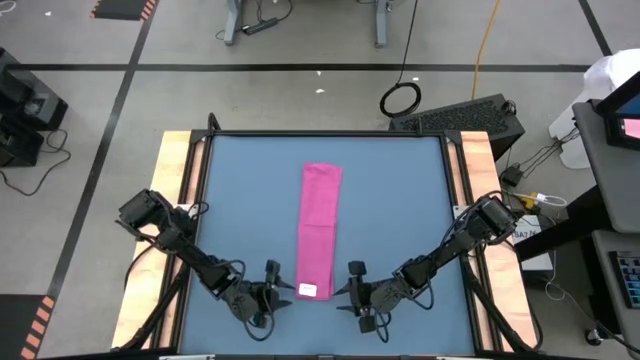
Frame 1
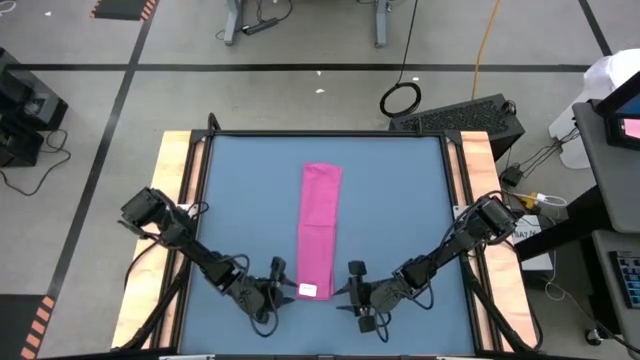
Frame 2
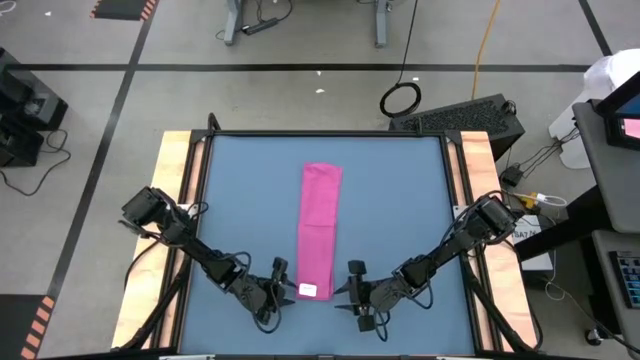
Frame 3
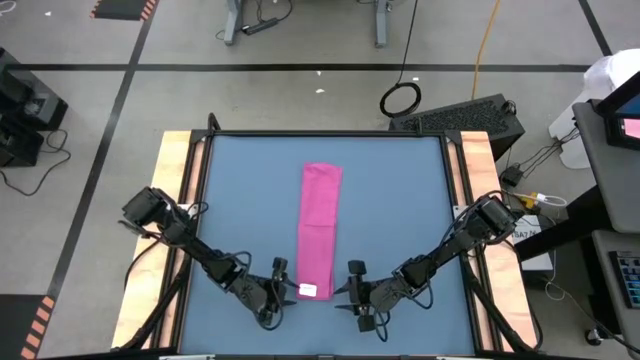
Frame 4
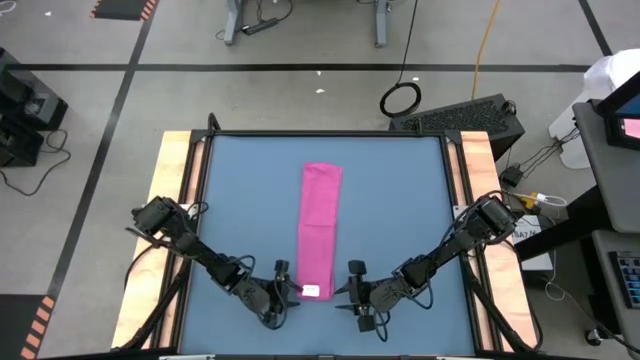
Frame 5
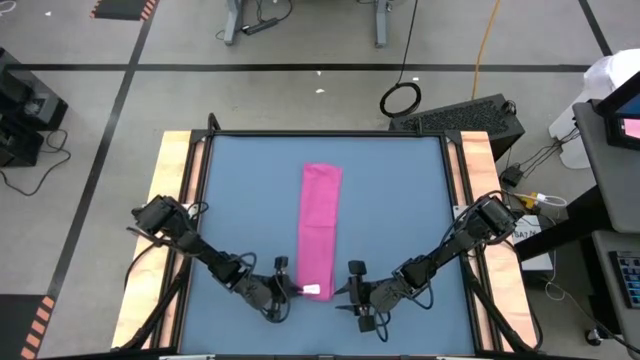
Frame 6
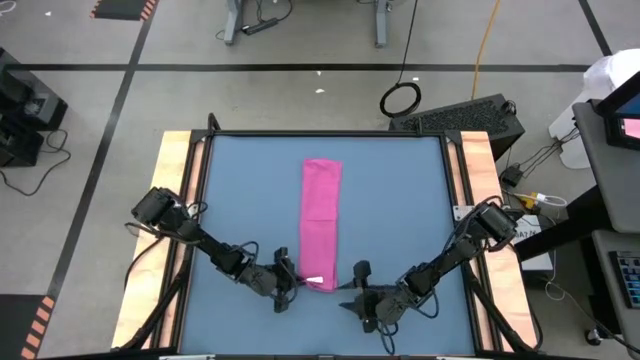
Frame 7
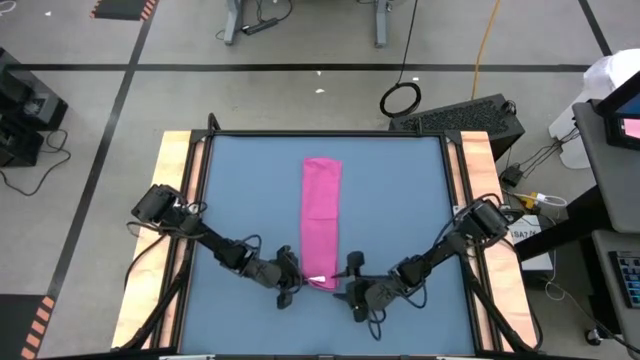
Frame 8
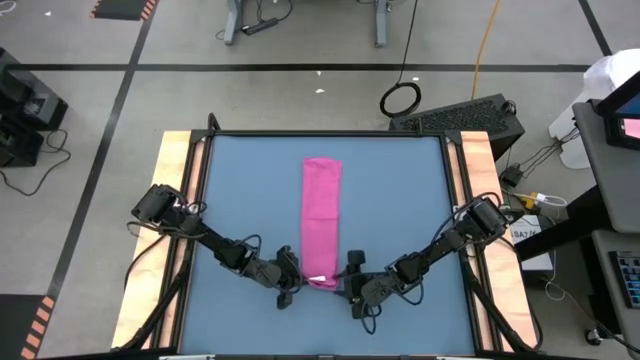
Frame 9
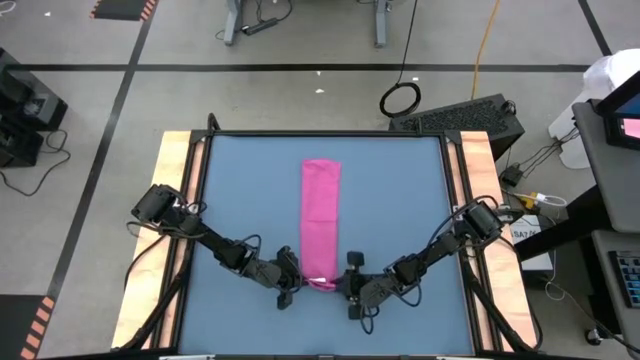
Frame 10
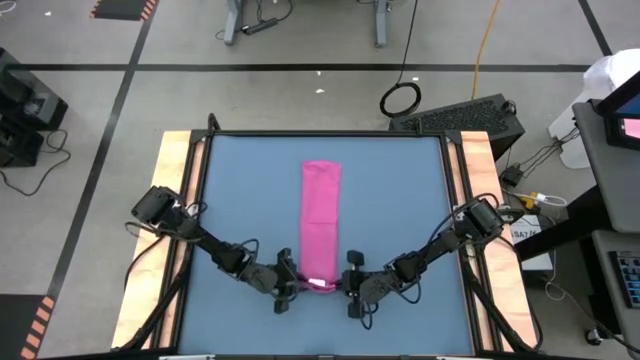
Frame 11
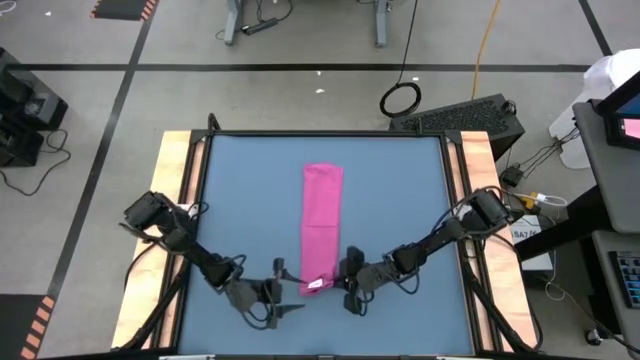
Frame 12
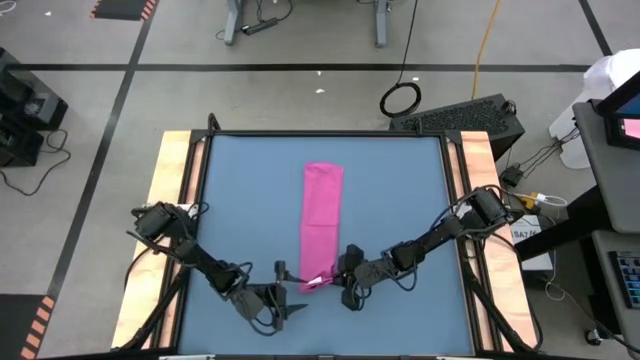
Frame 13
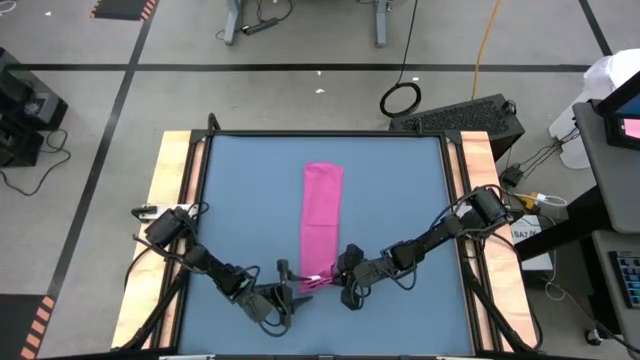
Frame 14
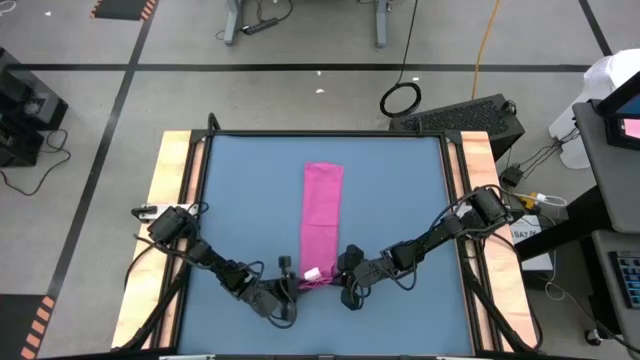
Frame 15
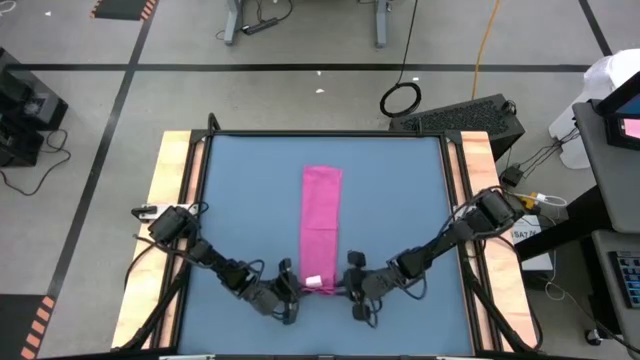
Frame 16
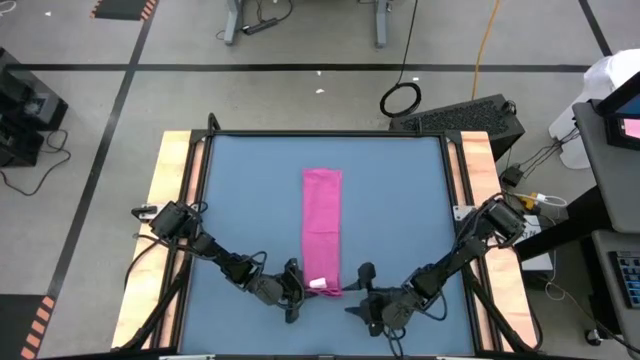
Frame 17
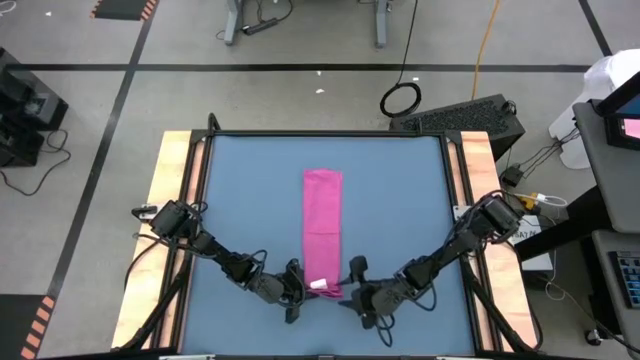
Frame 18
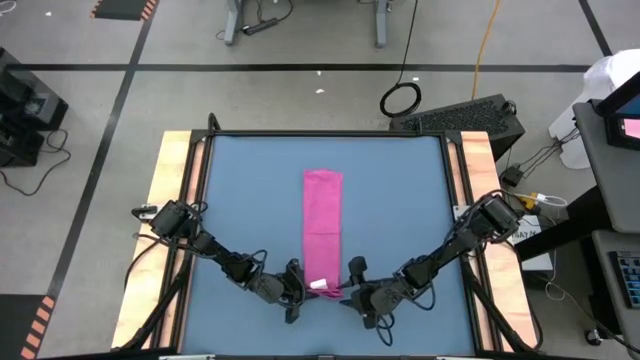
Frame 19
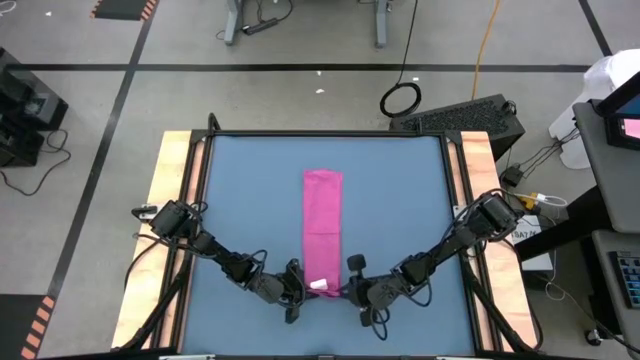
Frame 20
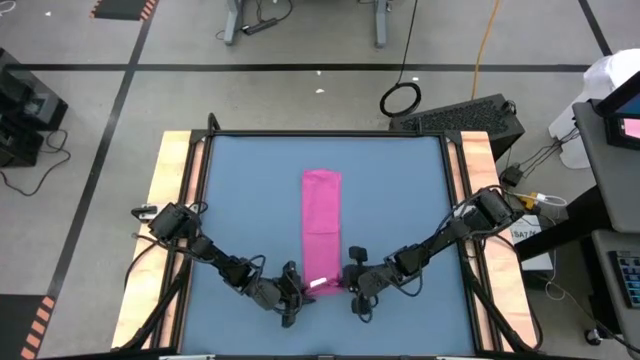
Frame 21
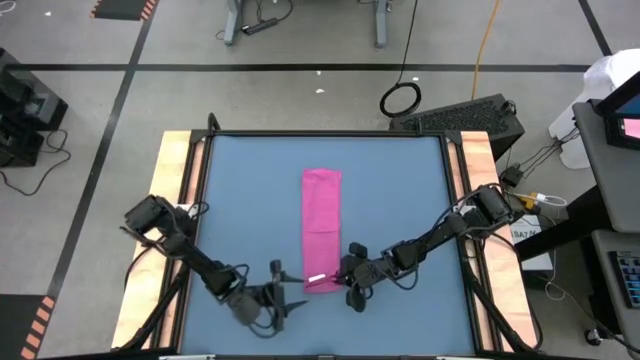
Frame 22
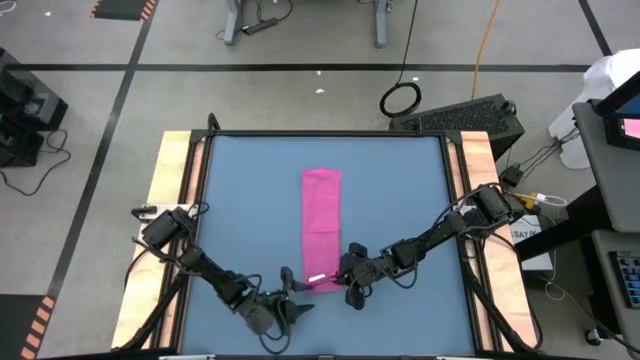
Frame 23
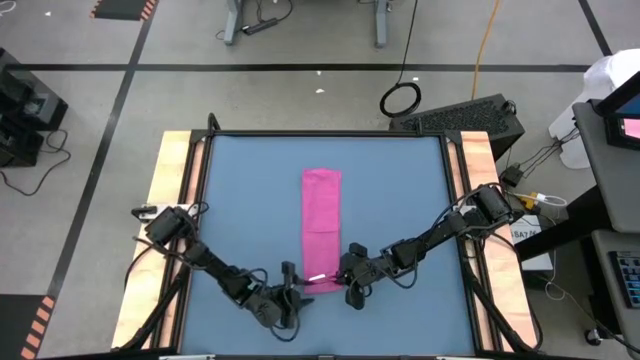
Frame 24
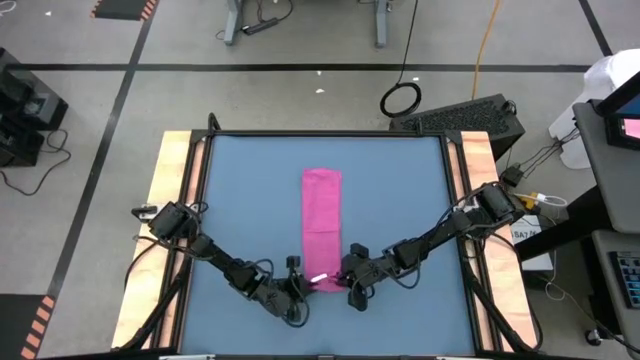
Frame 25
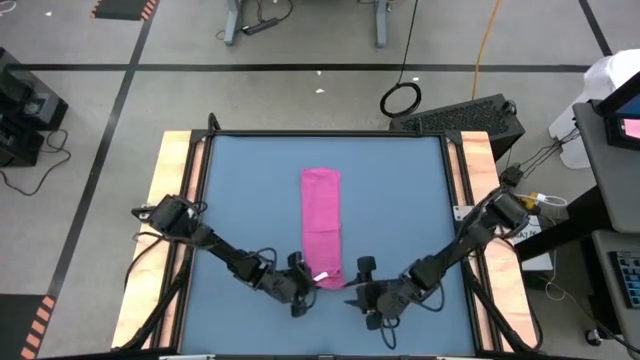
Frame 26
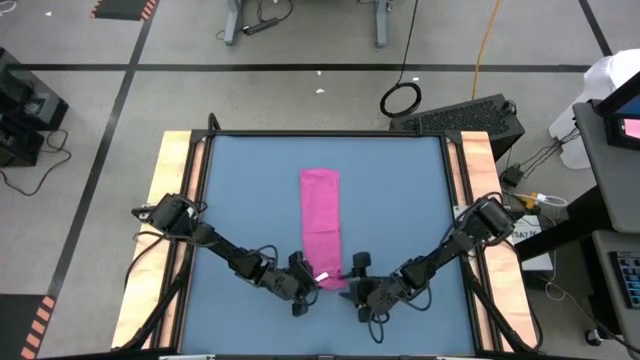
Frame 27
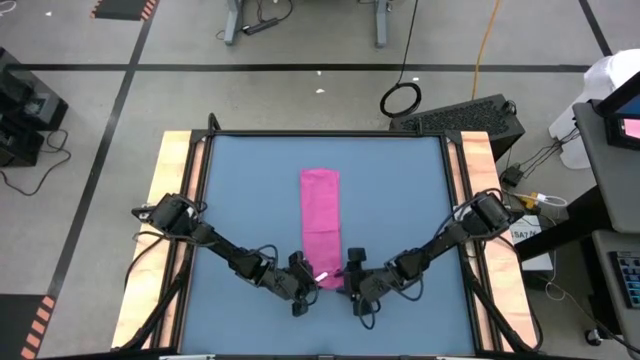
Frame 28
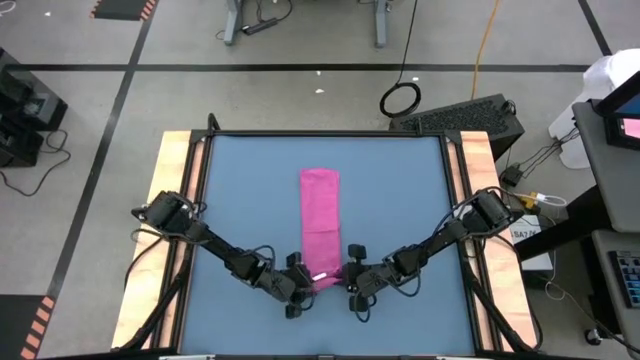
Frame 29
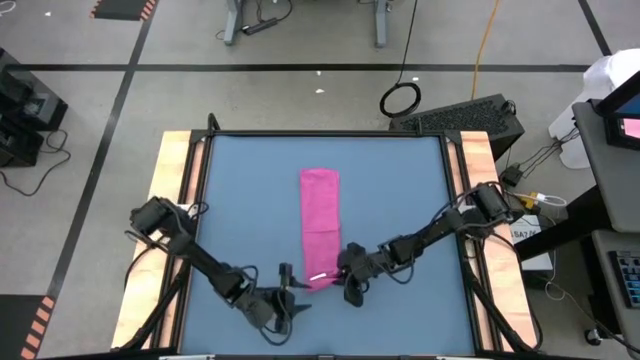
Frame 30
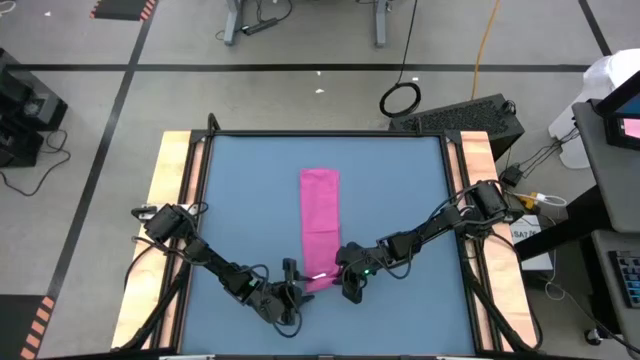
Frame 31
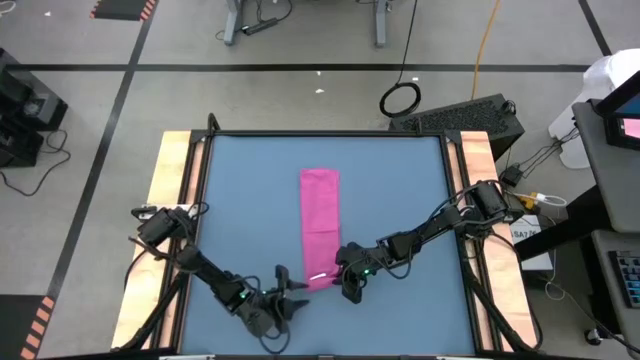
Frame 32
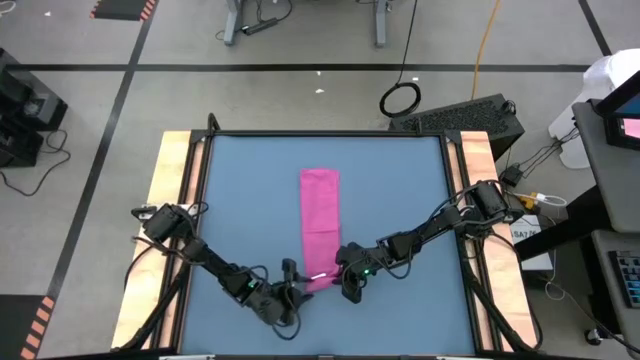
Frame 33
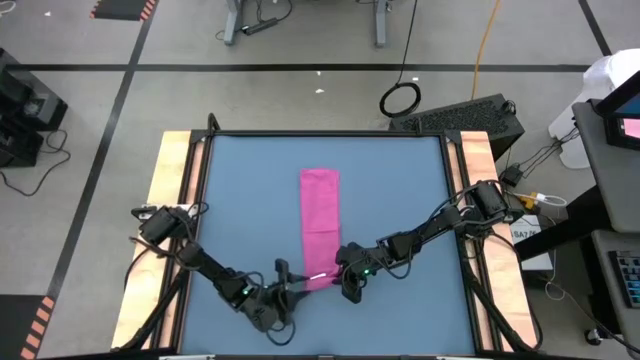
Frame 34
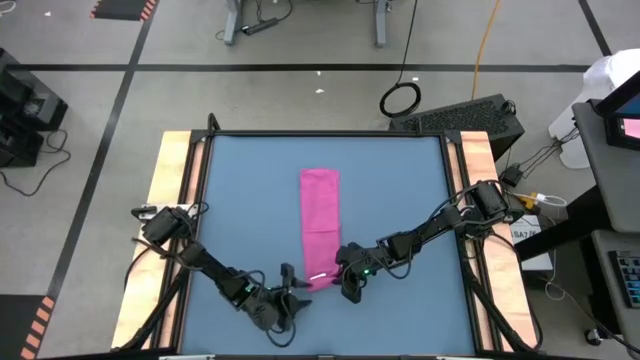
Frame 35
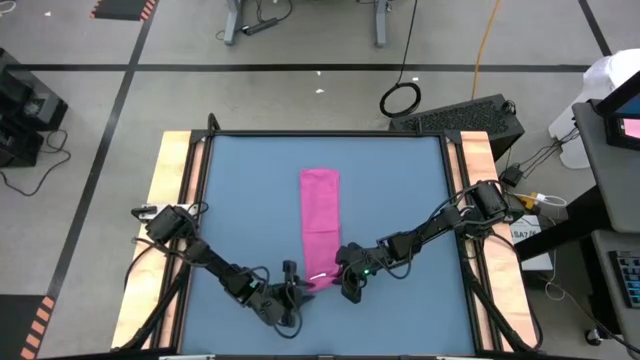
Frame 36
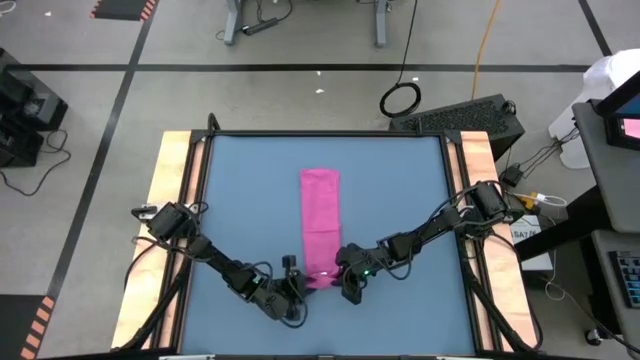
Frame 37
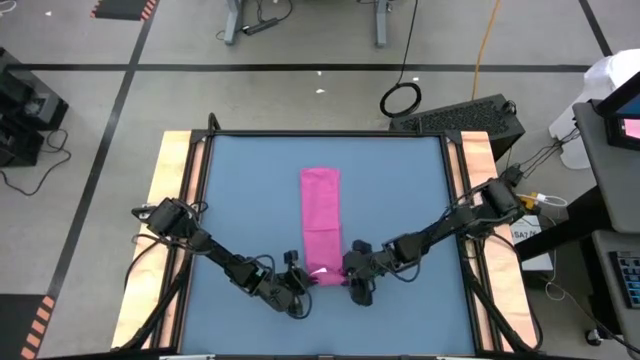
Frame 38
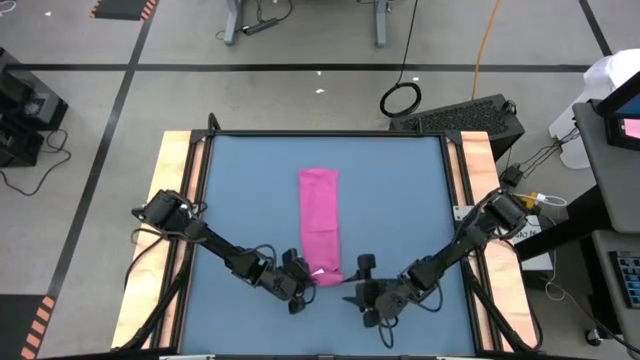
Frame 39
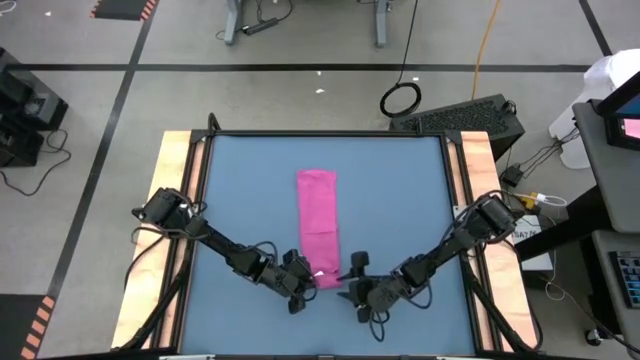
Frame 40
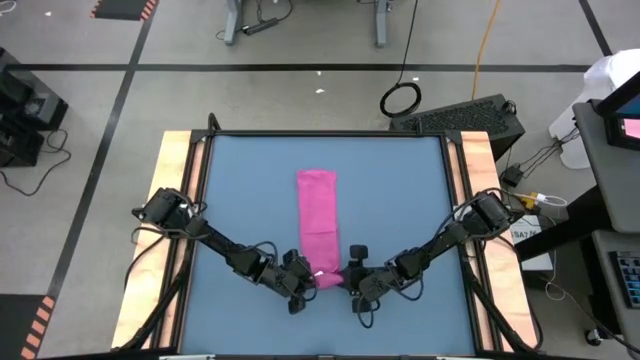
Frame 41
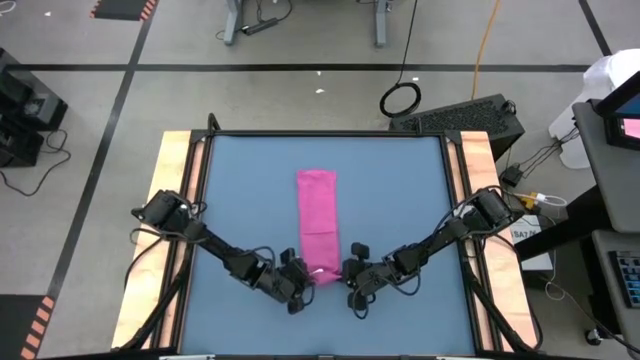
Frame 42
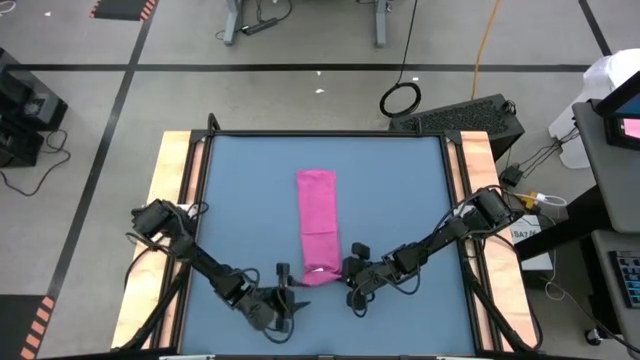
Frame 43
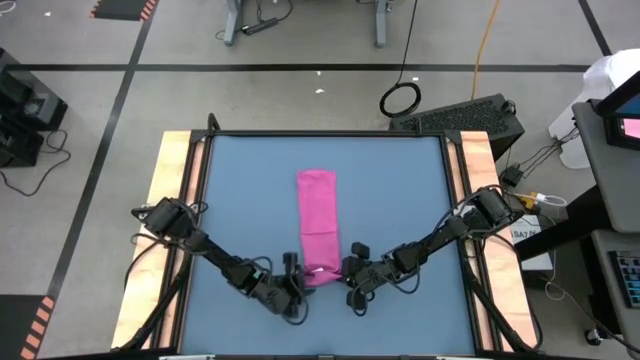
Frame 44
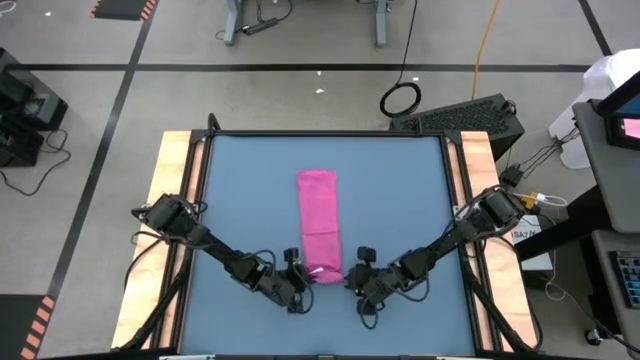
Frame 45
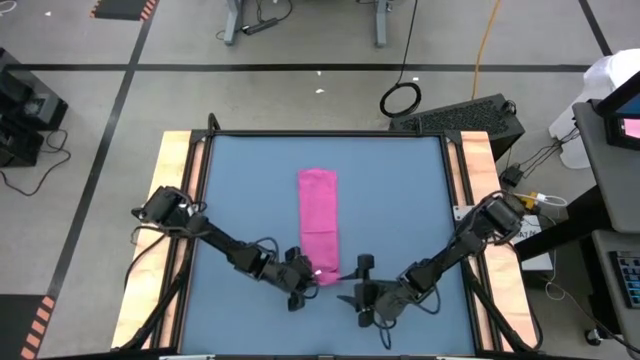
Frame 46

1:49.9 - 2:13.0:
Task: Roll towel into tight, uniform cylinder
Roll the pink towel
